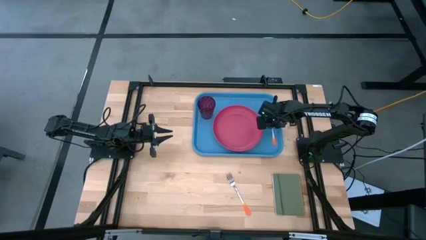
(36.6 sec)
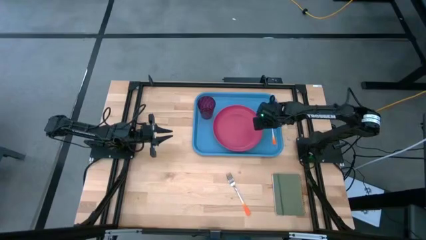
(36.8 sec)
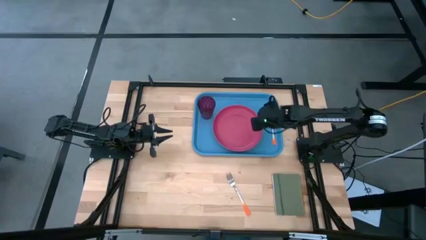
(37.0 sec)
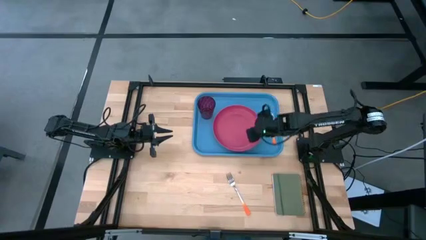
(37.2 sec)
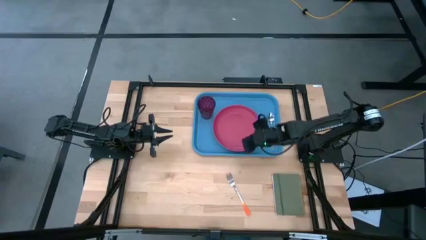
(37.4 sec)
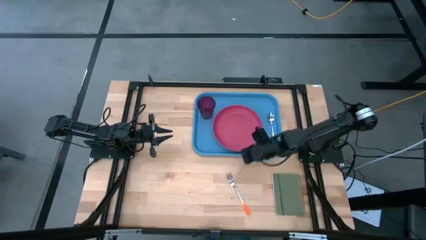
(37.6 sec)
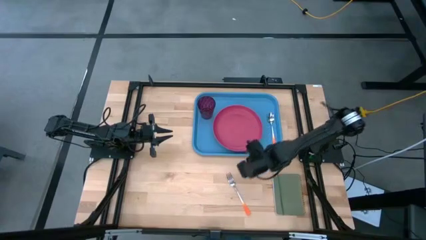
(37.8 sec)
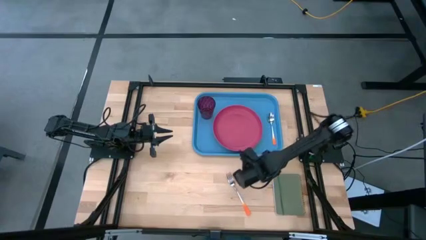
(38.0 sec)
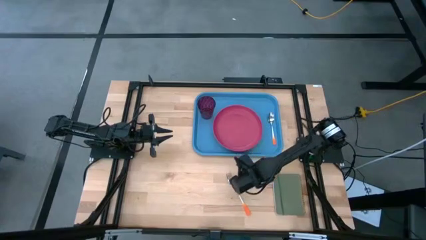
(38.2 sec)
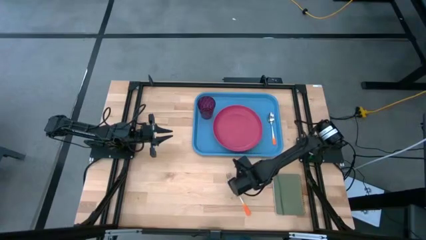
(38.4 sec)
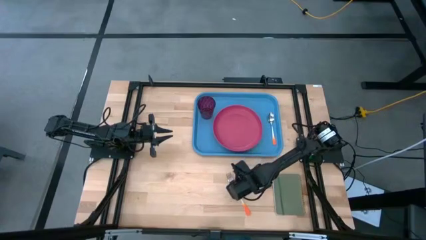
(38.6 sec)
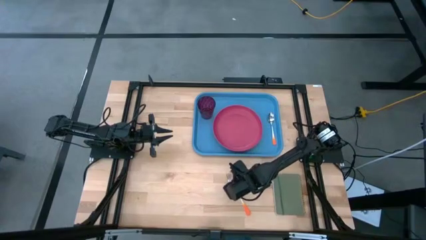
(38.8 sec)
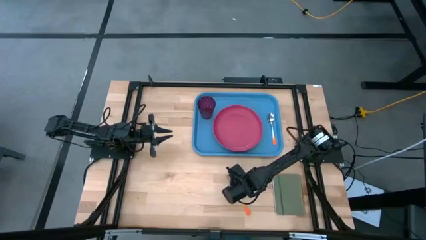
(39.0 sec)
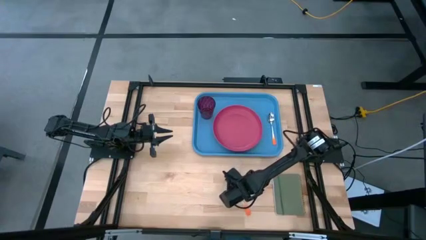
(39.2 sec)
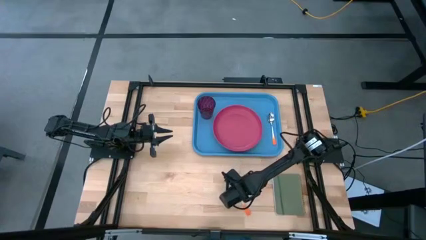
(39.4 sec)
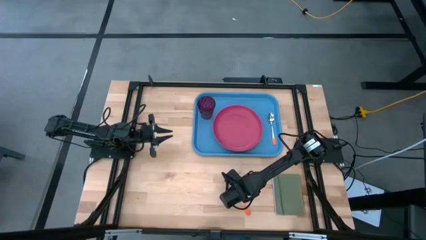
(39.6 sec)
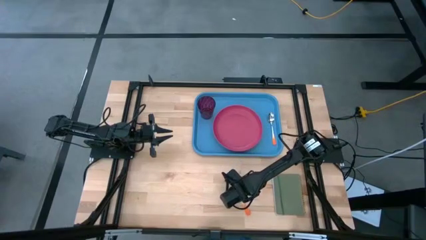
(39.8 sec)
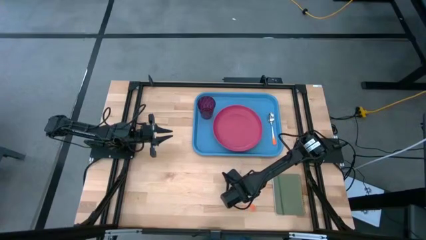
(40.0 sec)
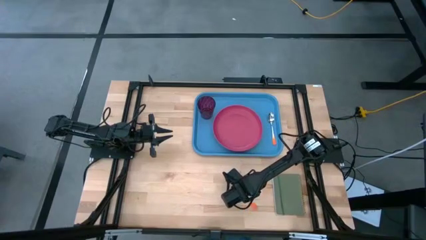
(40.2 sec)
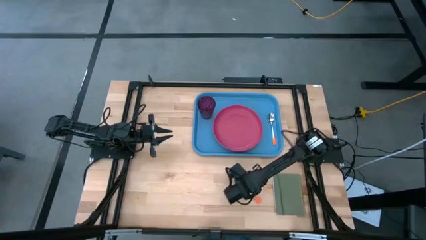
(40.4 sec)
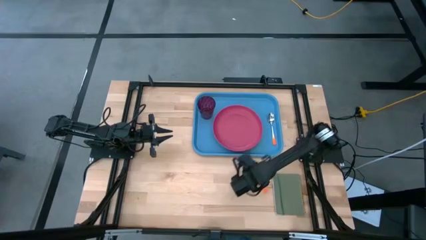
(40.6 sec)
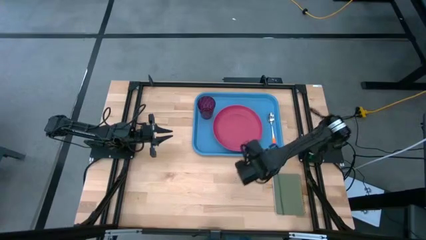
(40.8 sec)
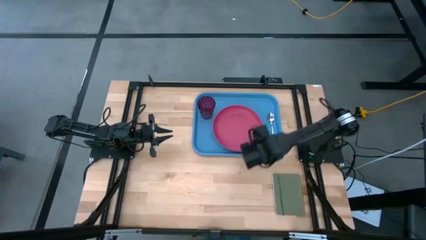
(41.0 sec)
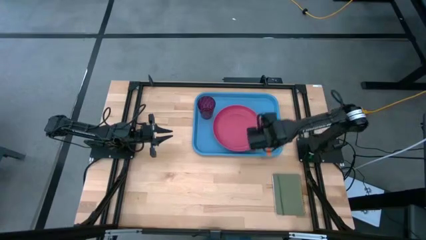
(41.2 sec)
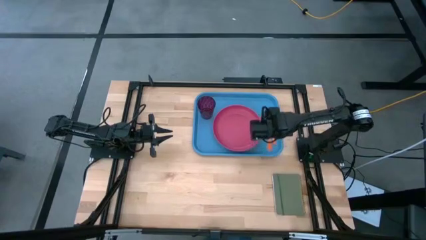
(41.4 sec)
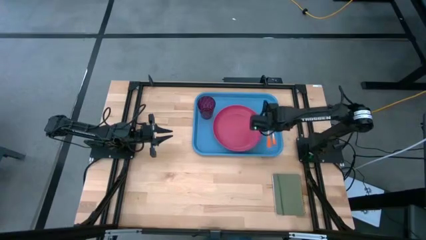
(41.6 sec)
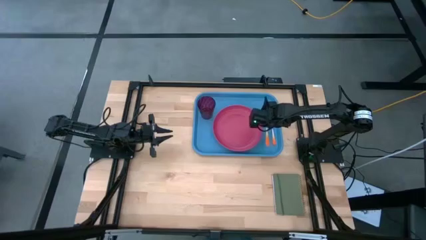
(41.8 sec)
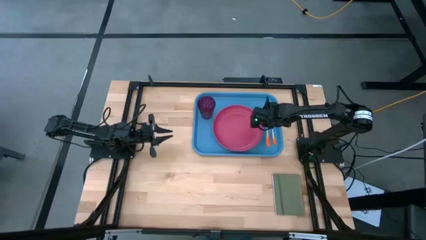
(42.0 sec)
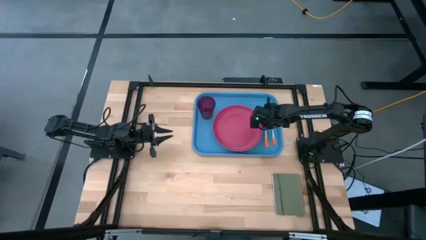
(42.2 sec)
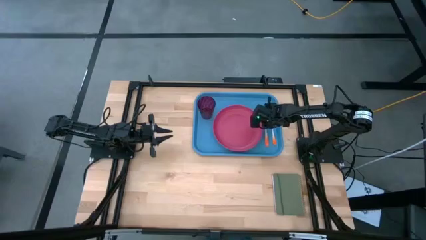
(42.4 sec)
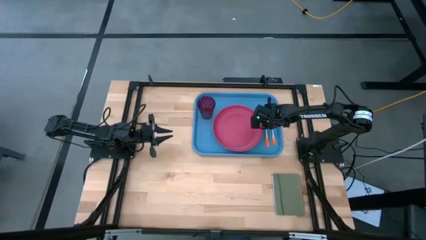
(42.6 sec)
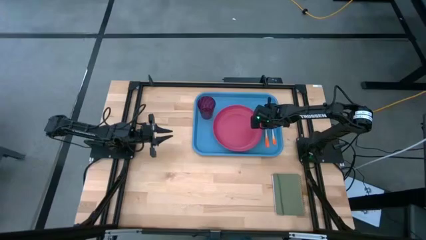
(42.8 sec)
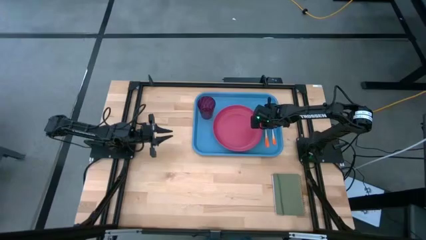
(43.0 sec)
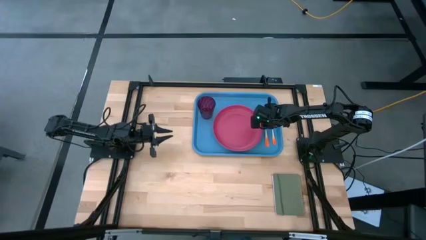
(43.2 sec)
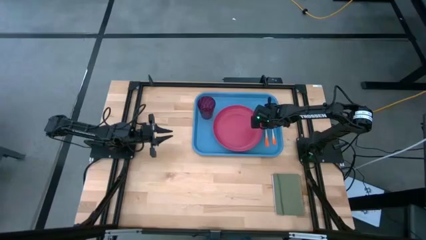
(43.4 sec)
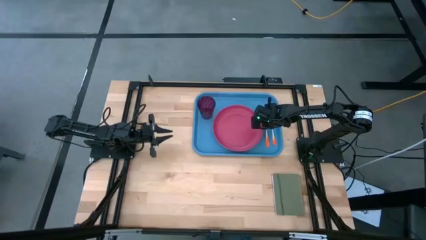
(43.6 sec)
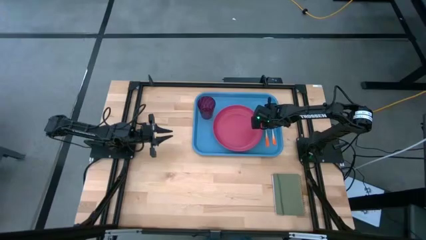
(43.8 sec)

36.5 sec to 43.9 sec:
Task: Pick and place plate/cup/fork/spoon on tray
Put the orange fork on the blue tray to the right of the pink plate

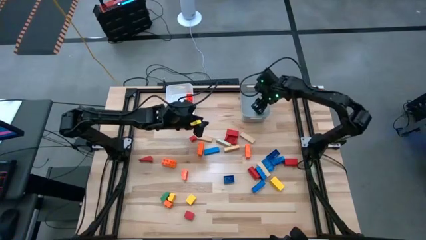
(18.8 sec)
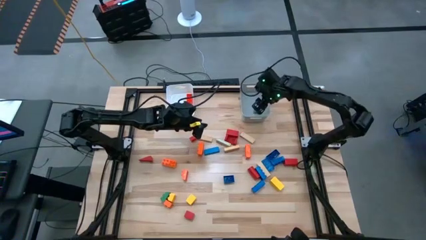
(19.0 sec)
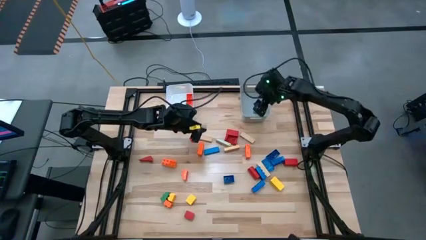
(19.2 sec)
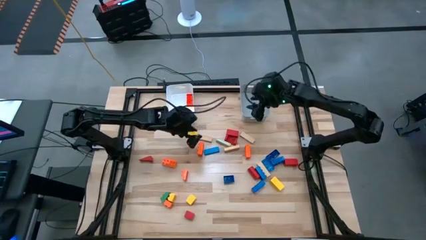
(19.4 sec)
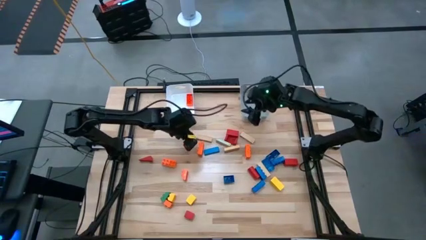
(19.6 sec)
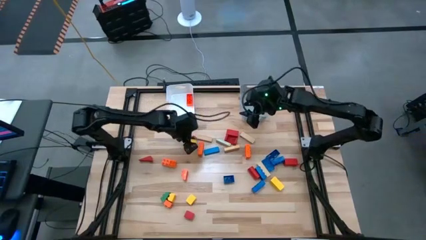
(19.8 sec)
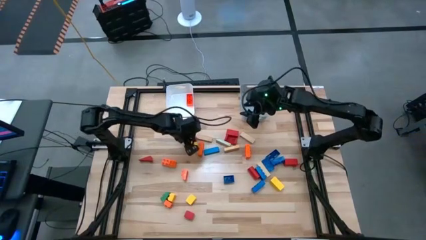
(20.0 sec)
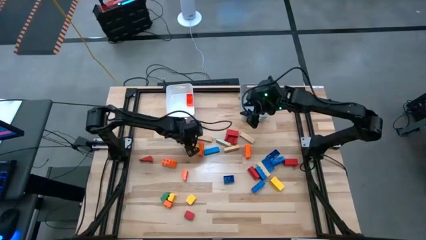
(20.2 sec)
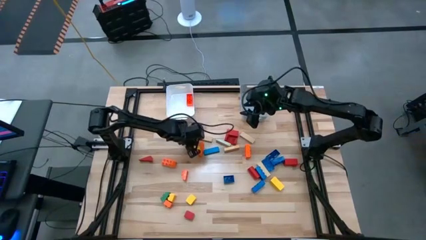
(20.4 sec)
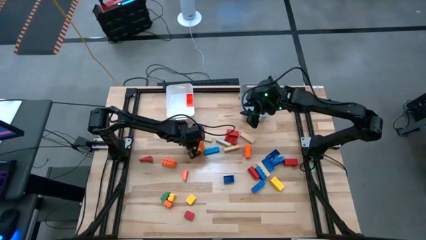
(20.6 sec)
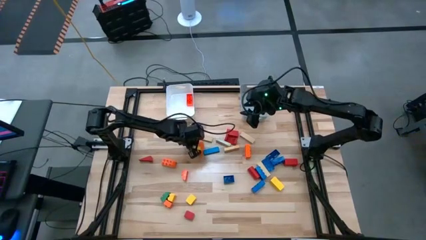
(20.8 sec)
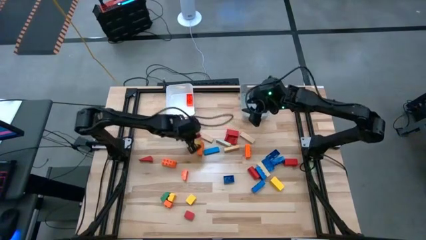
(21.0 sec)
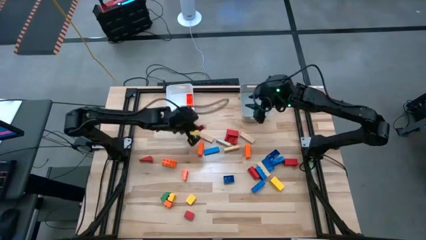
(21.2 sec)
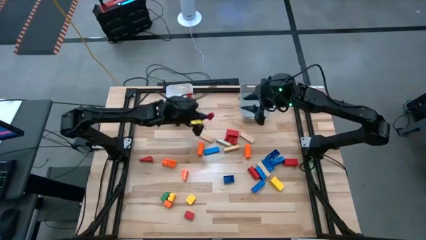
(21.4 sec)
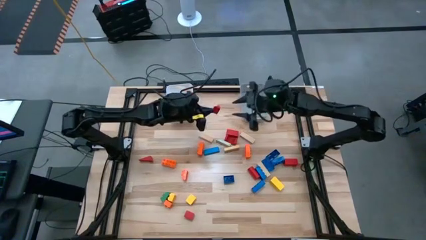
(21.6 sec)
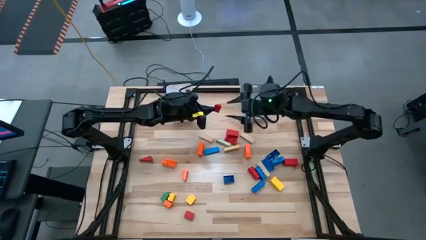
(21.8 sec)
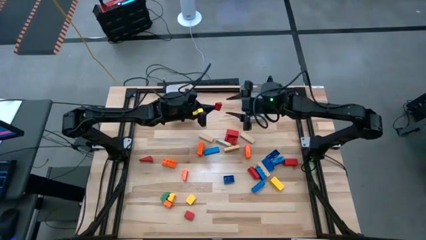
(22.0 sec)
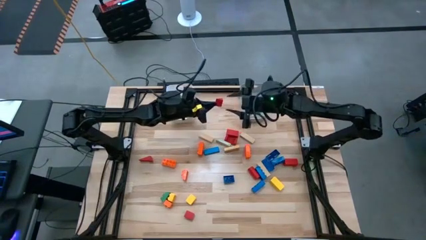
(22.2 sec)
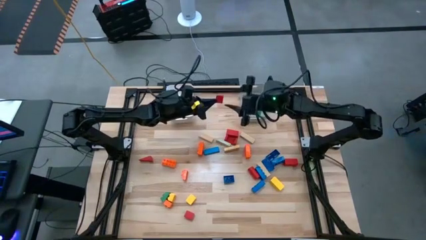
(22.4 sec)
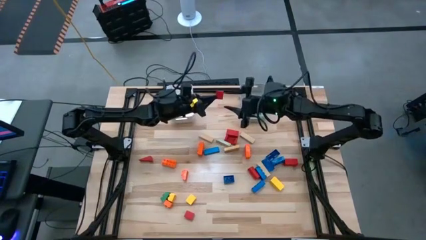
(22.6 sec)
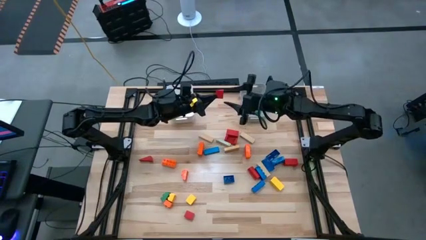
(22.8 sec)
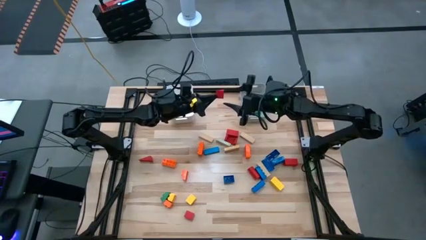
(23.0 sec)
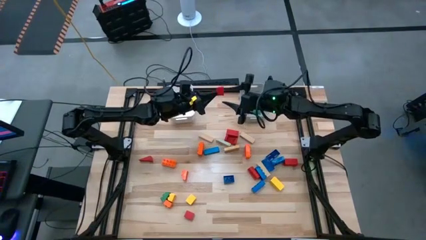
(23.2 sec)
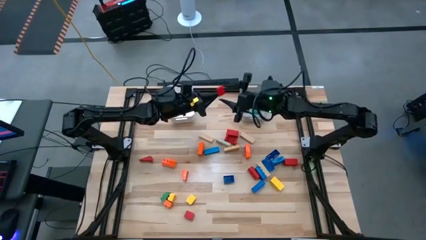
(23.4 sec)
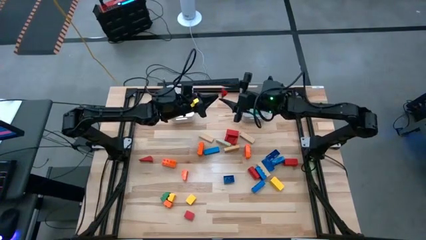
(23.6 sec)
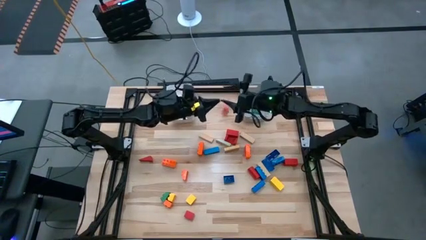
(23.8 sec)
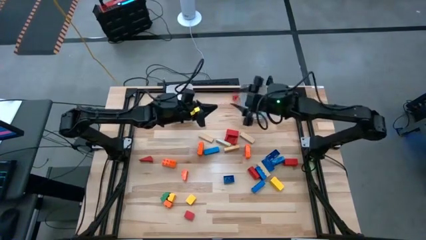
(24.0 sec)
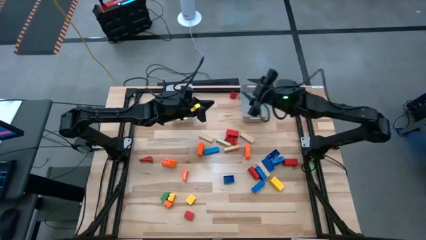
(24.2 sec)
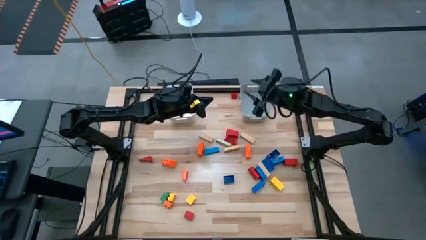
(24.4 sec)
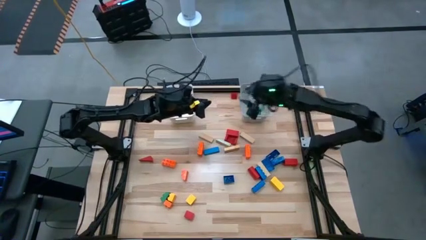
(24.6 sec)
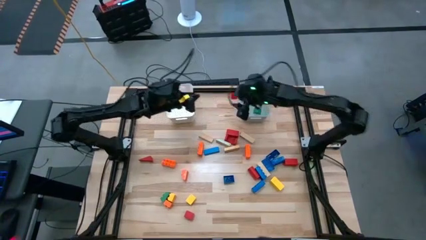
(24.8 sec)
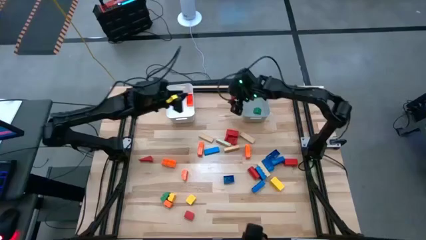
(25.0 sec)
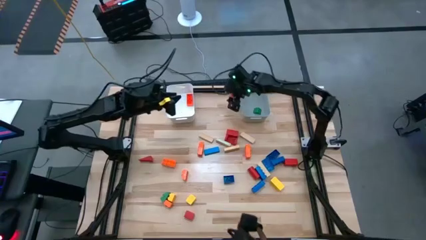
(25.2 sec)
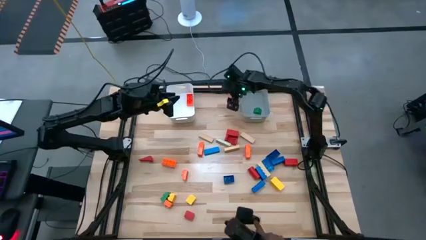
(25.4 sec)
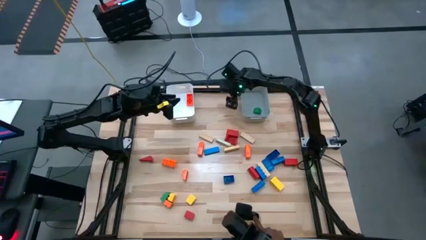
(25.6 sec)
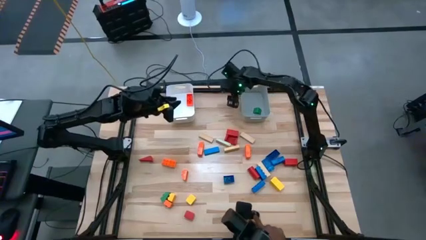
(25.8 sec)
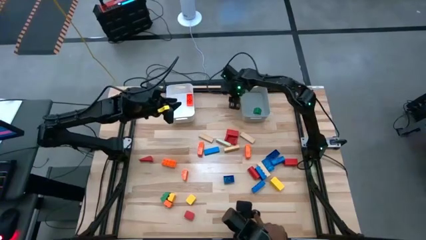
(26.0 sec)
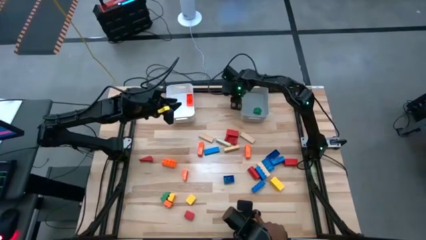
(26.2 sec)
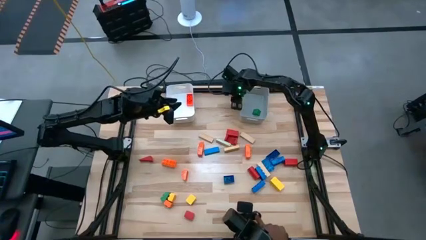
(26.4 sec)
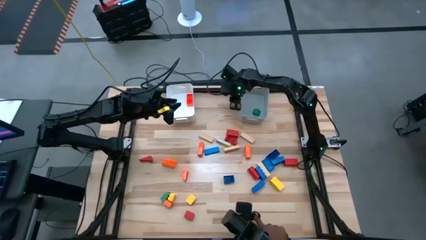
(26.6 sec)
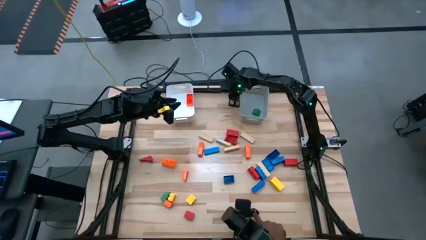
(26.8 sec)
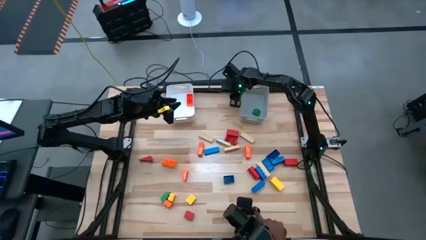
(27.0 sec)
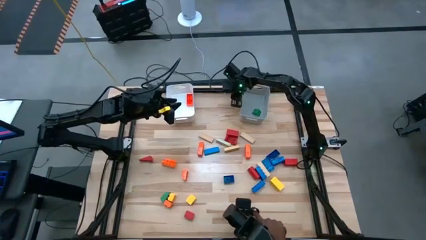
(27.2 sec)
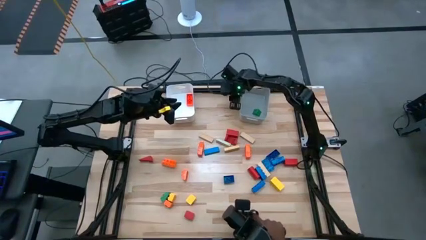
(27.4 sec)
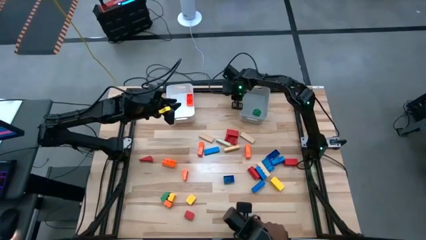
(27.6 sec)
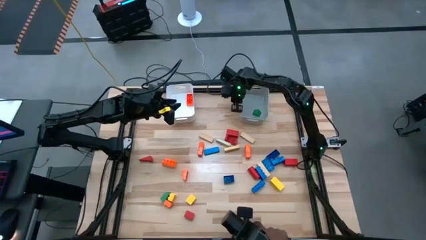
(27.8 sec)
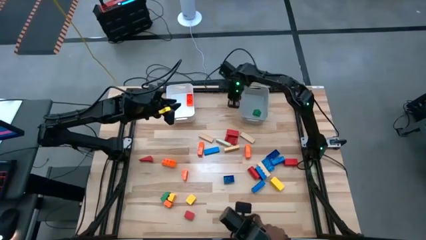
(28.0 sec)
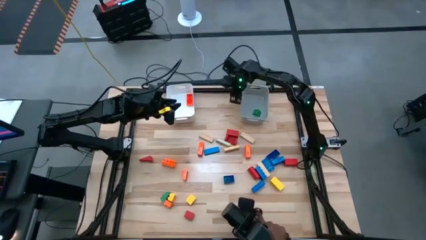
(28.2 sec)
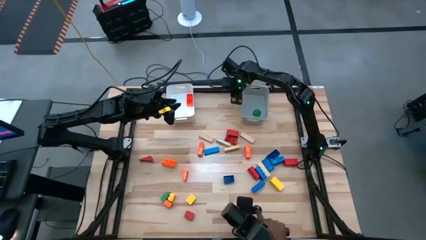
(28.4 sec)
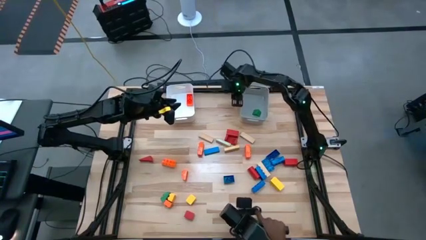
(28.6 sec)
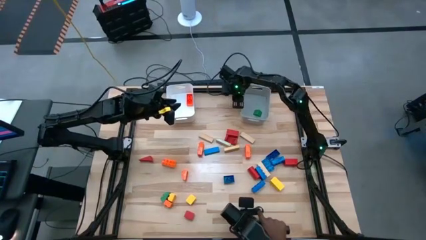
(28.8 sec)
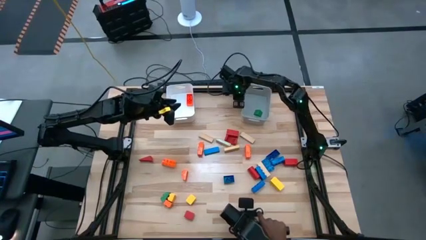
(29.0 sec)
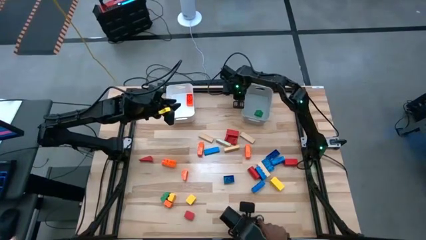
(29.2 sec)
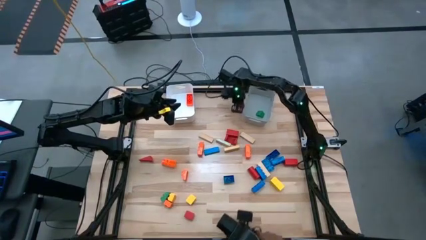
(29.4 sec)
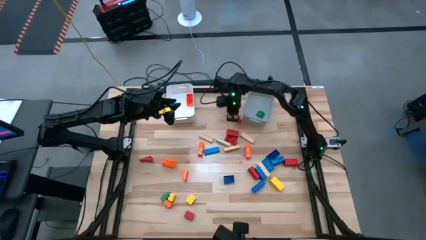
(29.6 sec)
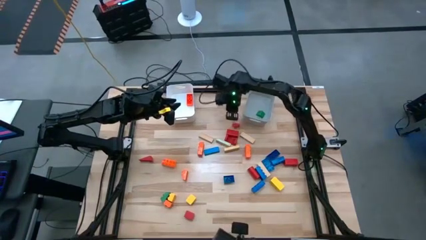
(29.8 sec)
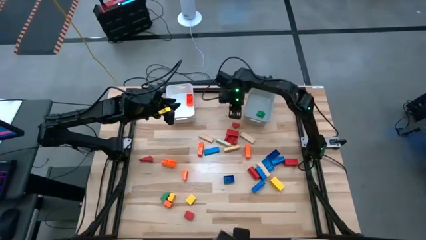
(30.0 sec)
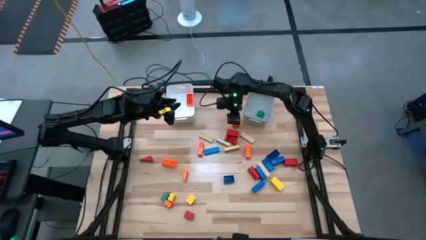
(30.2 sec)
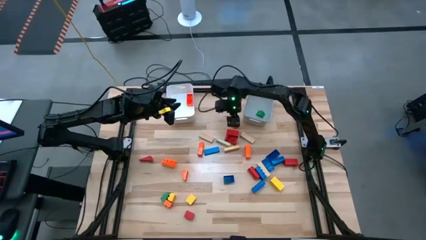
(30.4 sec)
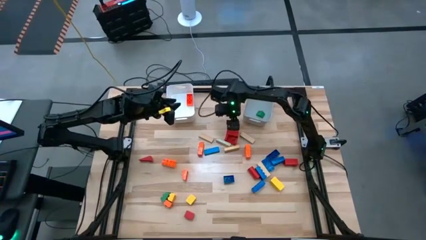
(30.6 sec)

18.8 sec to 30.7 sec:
Task: Sort blocks by size
Put the red triangle wooden block into the gray bin
